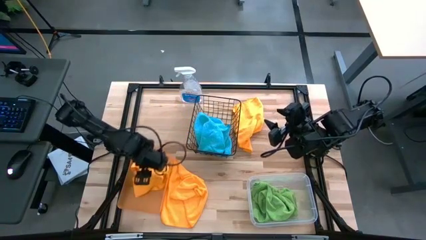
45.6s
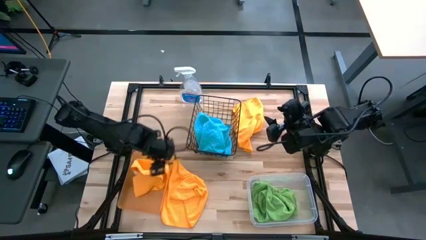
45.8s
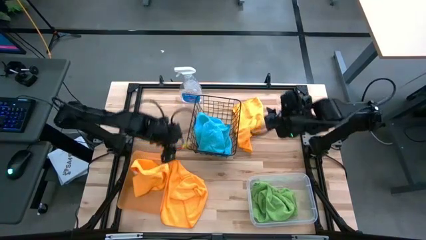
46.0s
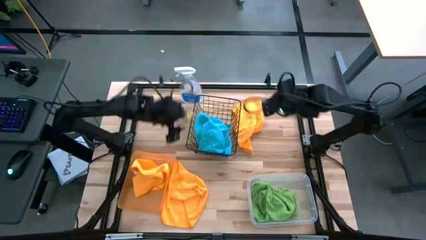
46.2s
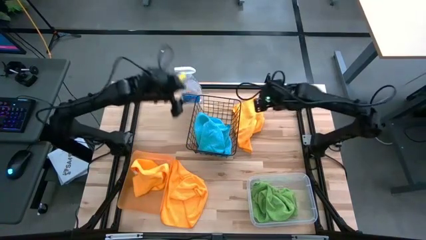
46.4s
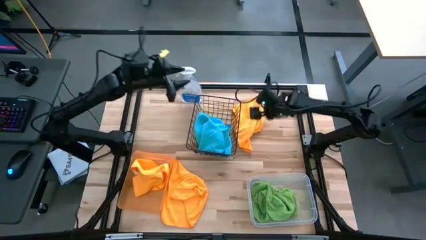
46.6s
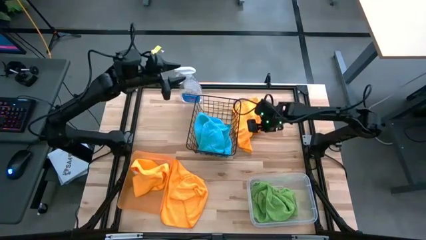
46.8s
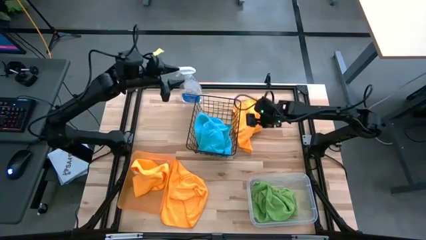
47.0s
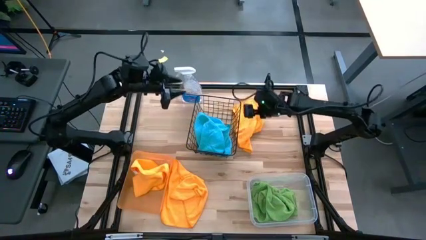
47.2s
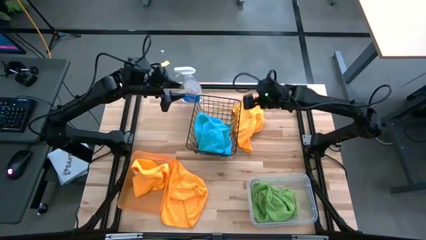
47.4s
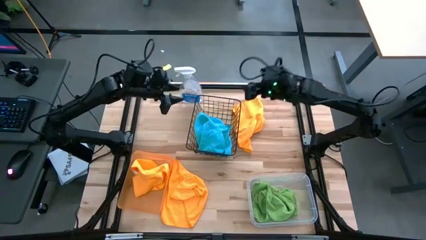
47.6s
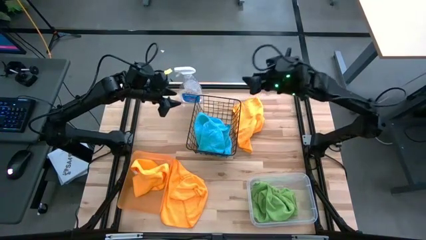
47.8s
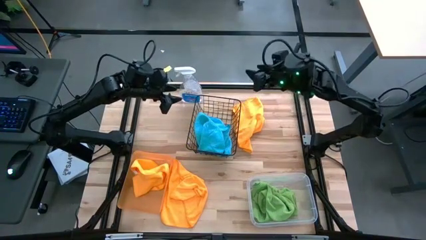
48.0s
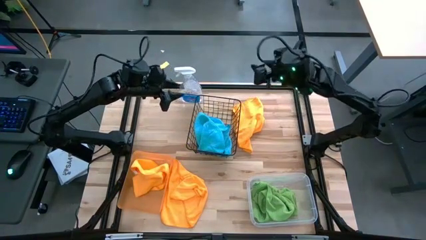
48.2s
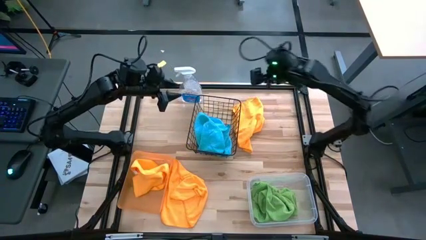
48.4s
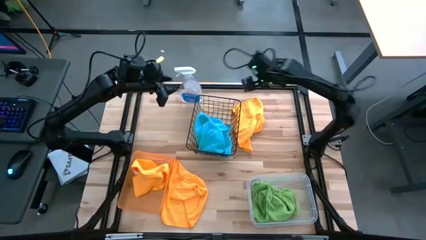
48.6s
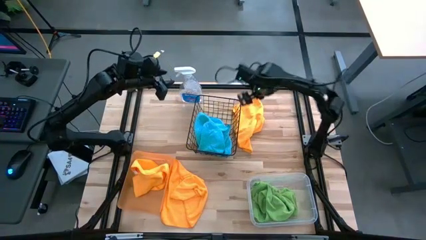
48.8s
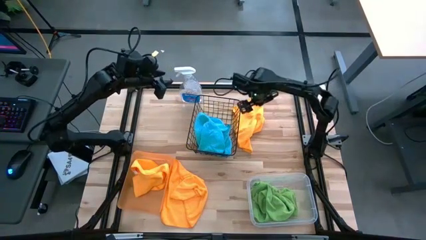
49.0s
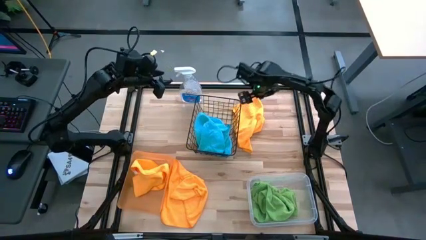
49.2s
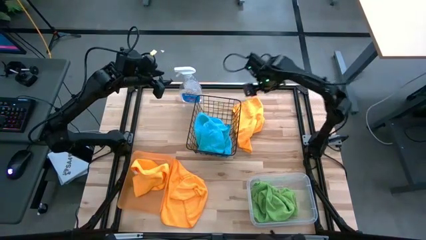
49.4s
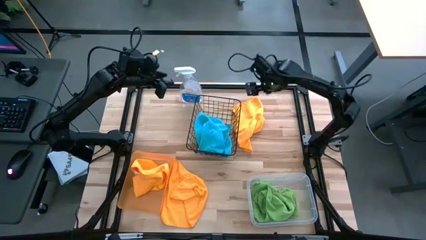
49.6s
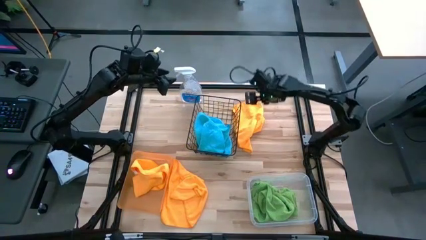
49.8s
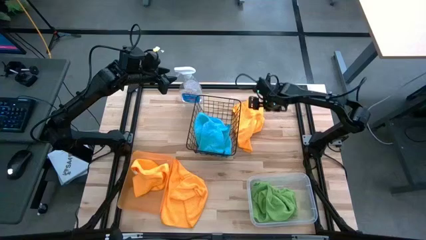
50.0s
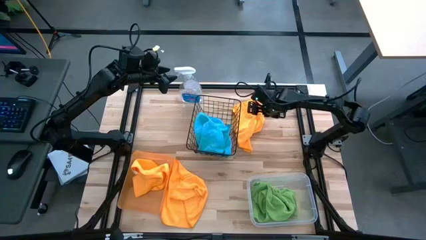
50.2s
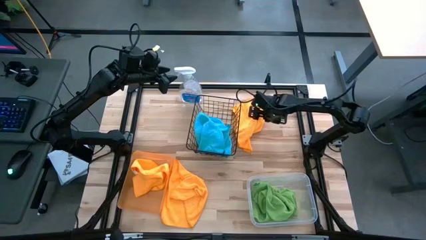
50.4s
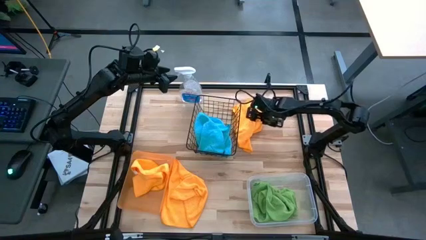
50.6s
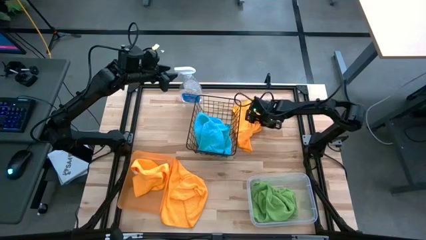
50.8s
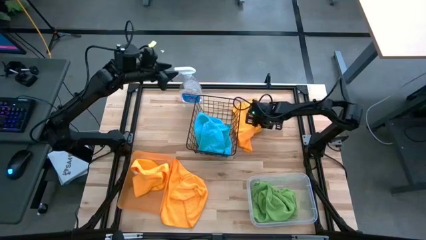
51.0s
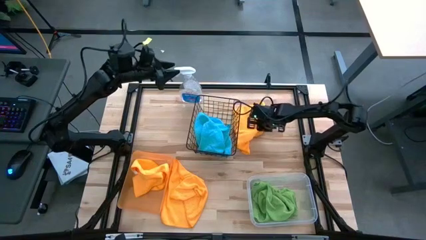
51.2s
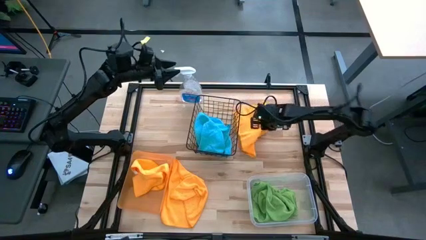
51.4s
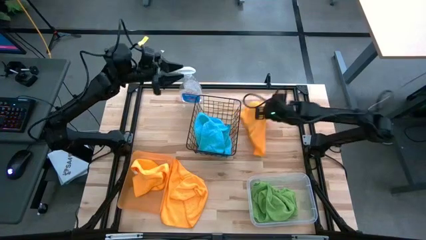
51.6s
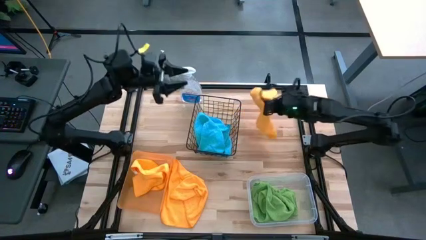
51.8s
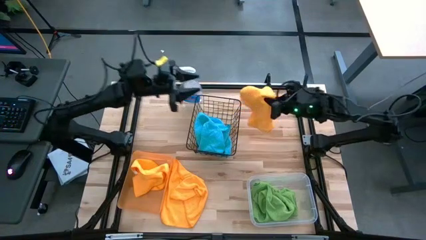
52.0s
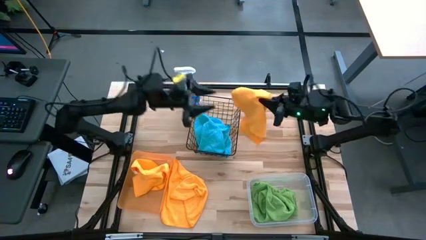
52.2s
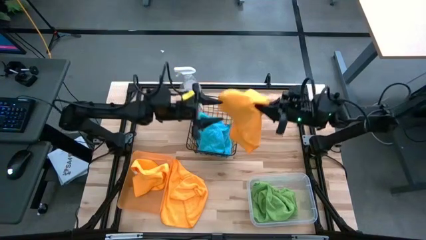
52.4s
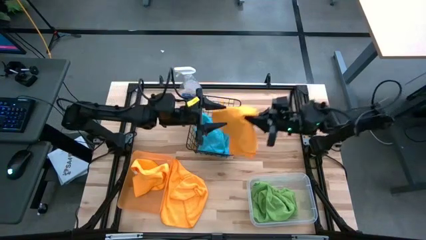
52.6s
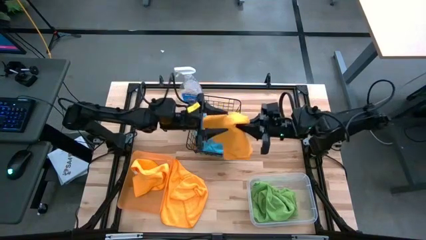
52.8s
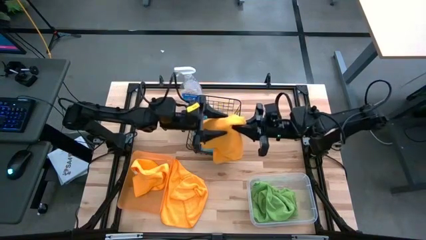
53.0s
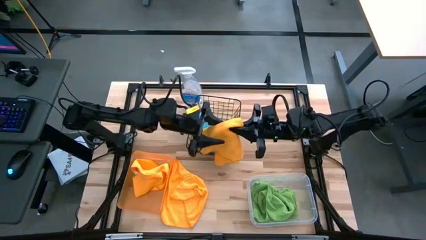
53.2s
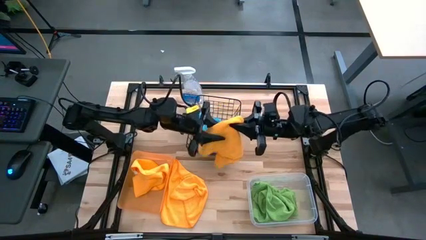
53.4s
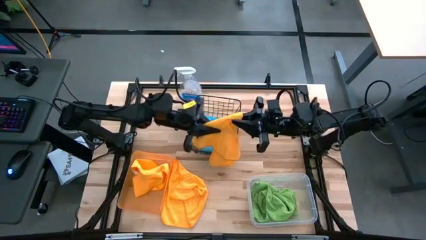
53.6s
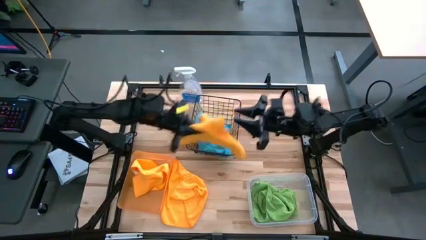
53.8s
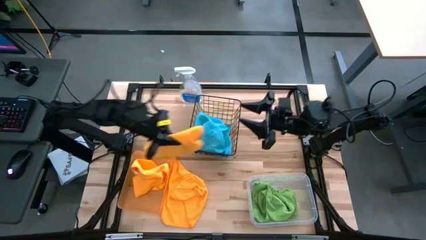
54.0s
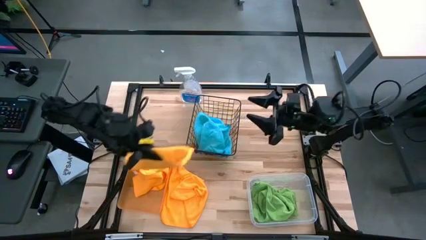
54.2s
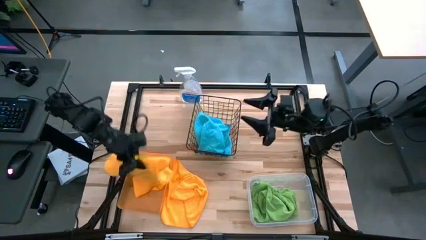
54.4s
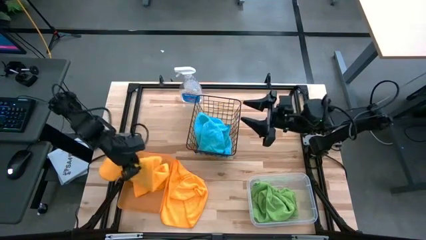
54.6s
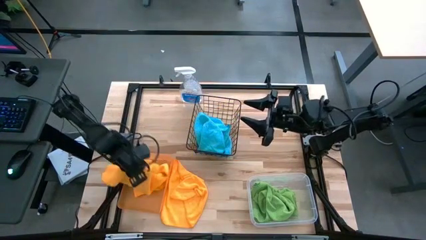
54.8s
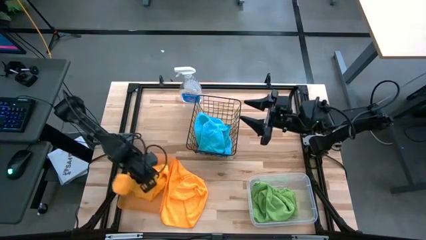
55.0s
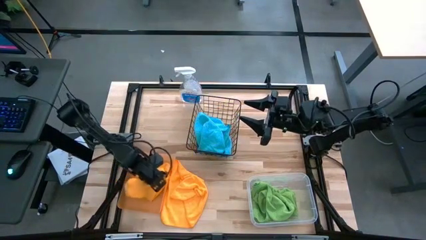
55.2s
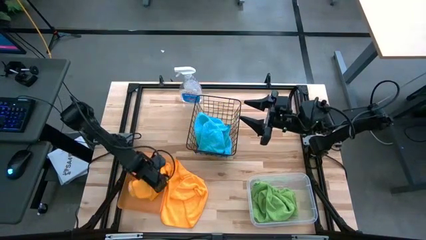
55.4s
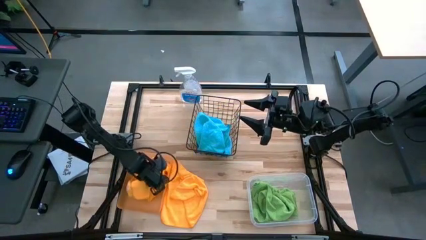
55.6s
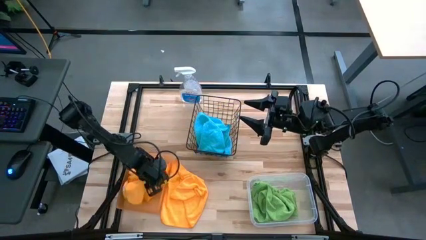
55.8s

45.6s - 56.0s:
Task: Sort microfiber towel by color & place in baskets
Put the top orange microfiber towel into the orange bin

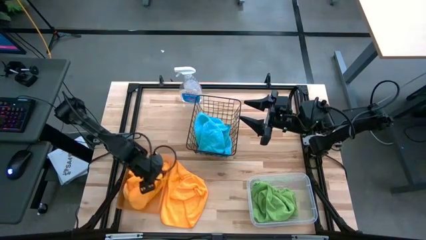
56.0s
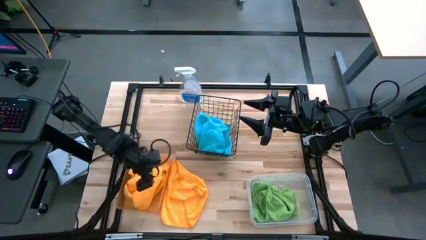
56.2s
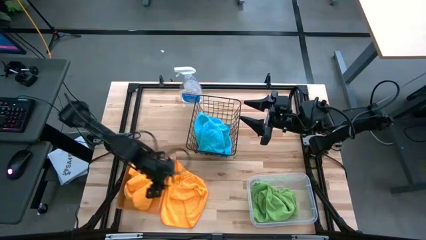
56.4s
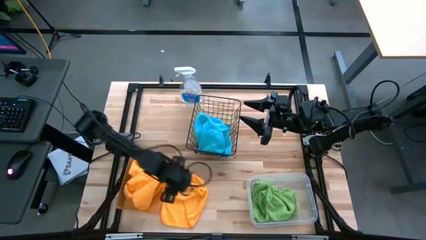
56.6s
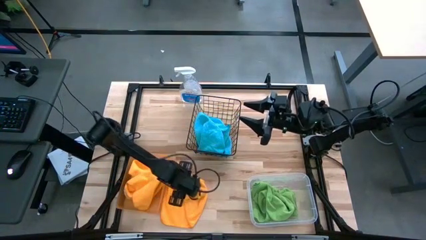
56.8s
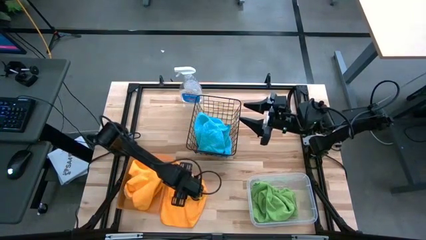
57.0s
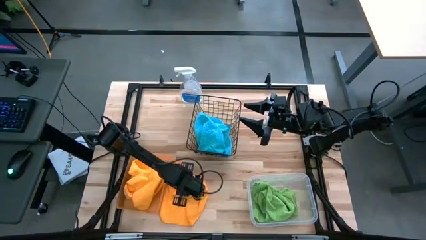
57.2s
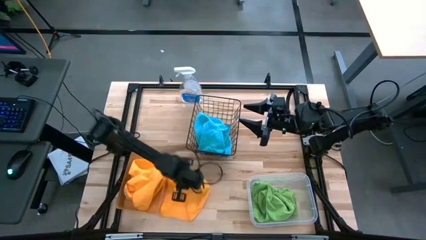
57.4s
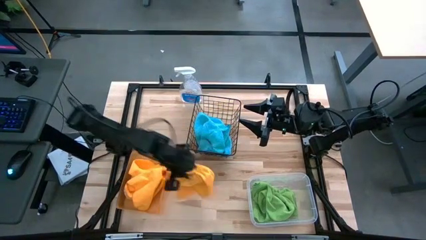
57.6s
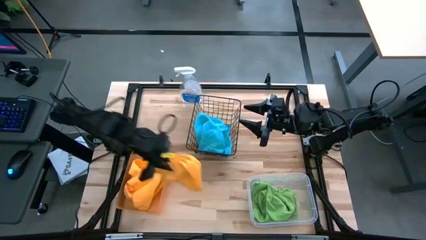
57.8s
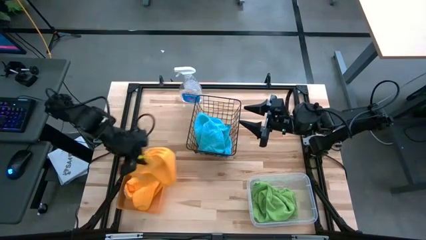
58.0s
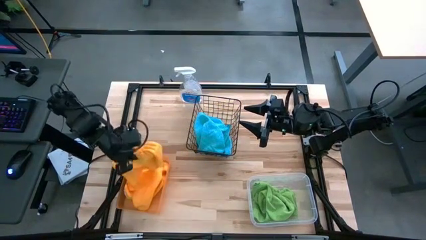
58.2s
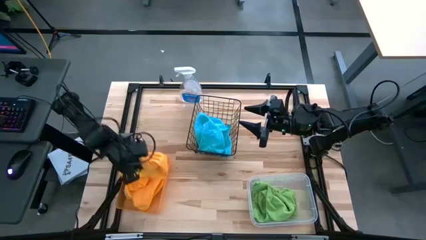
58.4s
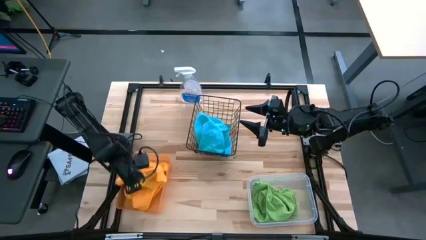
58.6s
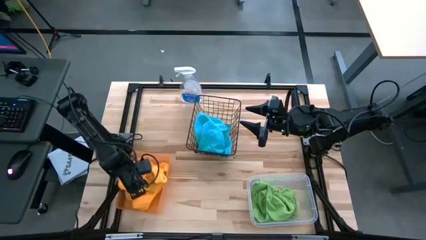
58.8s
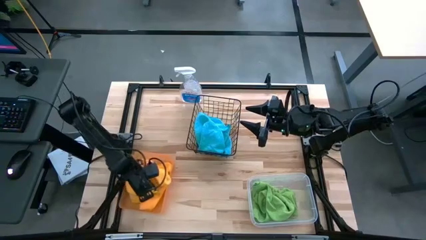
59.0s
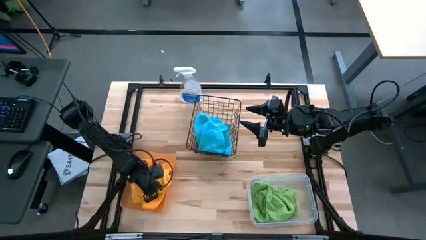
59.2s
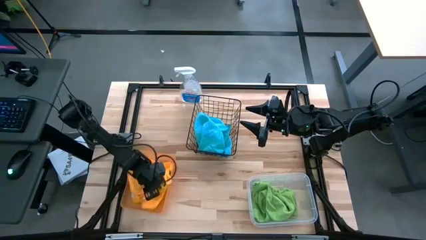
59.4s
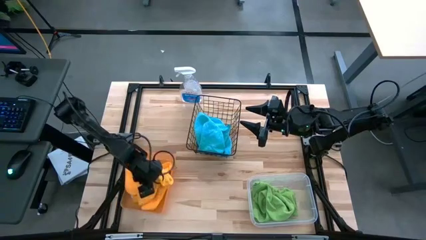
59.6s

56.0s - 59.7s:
Put the orange microfiber towel into the orange bin

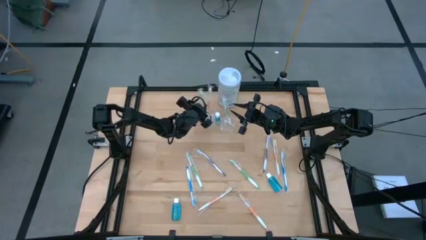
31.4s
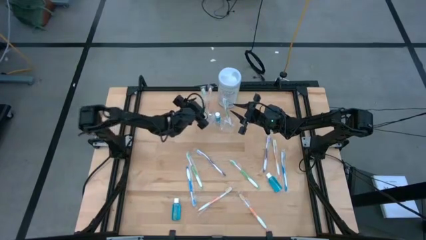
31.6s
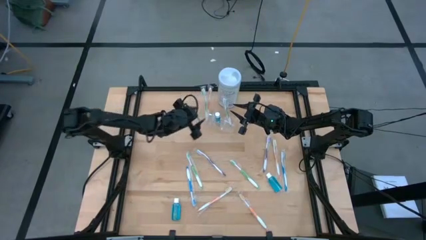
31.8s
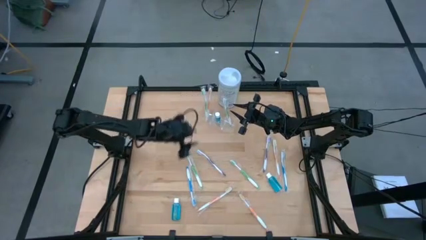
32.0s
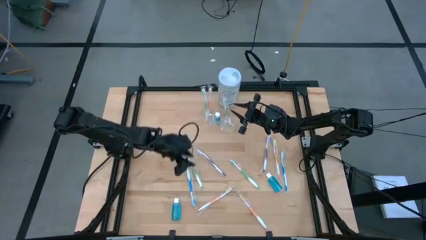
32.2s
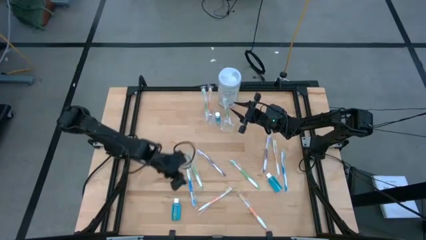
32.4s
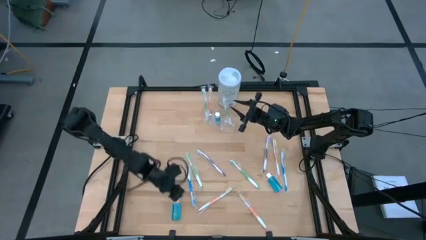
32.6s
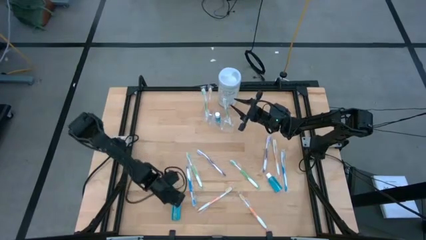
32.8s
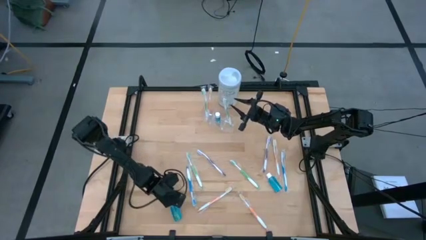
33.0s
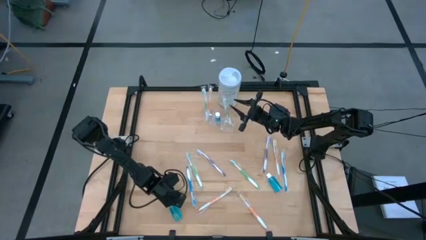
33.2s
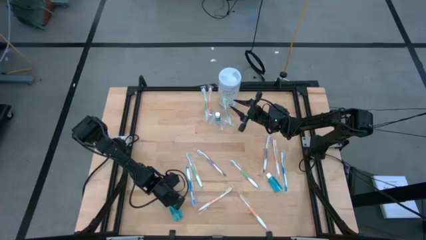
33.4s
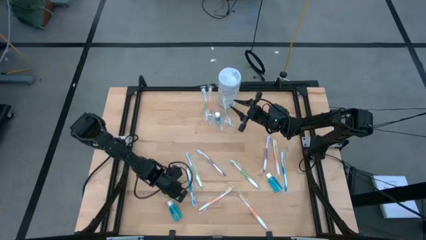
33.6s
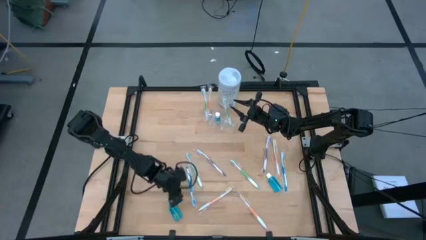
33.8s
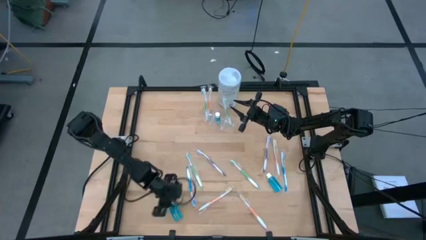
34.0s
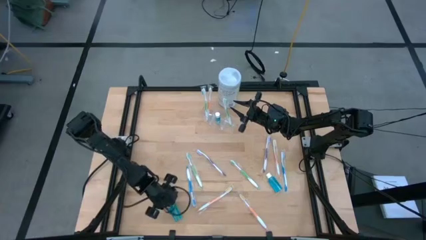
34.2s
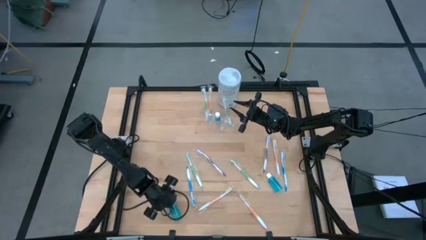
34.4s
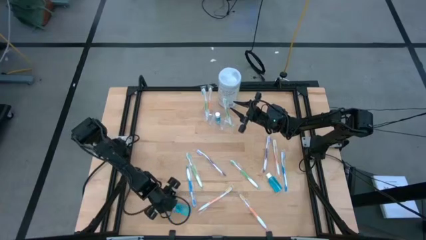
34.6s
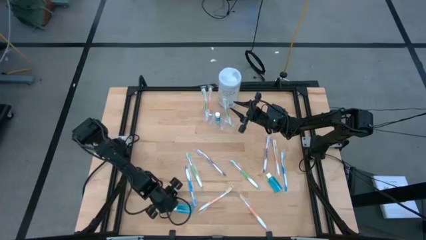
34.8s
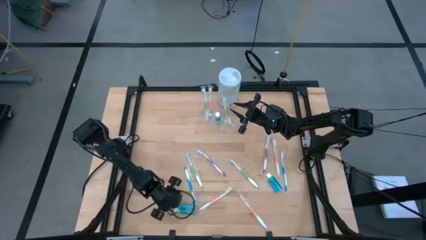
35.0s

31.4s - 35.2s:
Task: Pick & Place toothbrushing station
Put the left blue mouthwash into the transparent organizer
